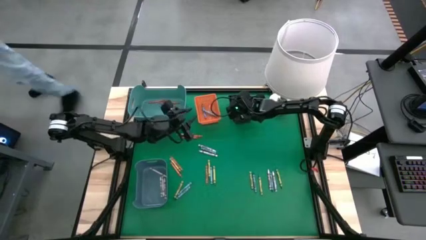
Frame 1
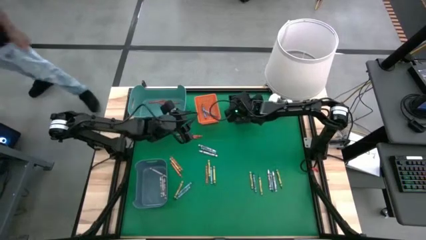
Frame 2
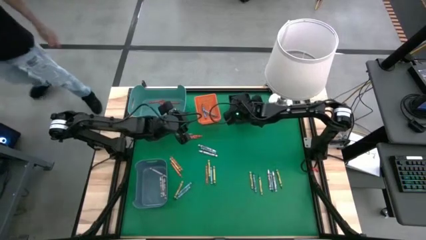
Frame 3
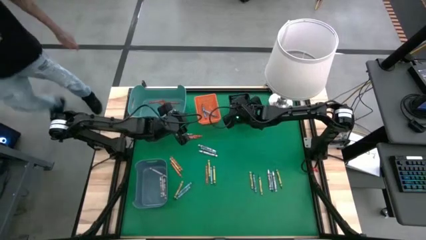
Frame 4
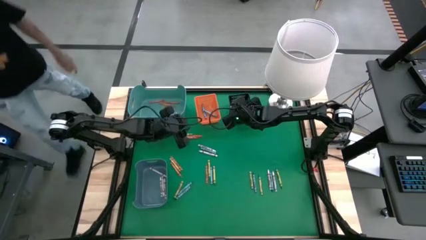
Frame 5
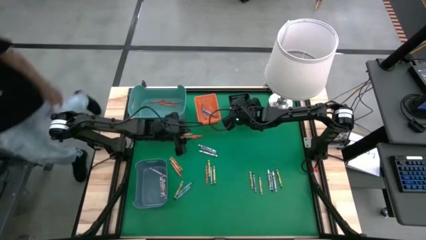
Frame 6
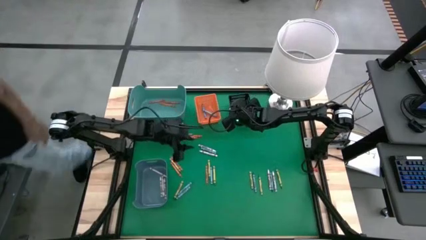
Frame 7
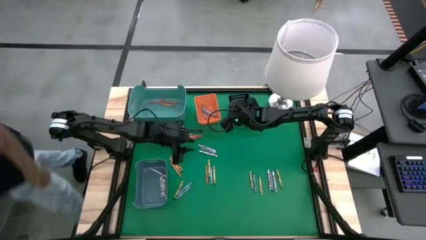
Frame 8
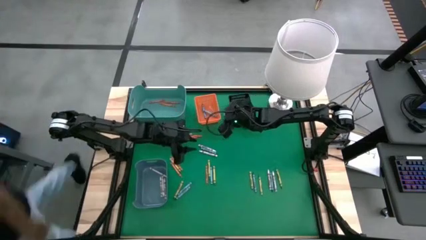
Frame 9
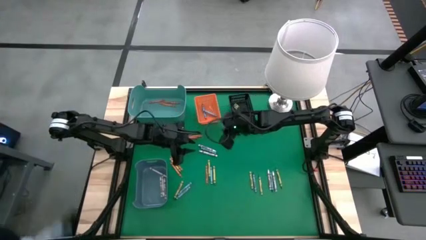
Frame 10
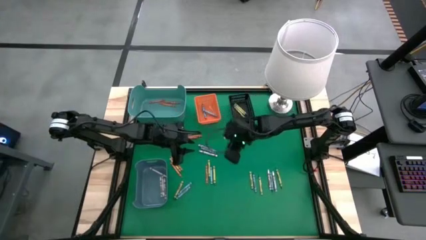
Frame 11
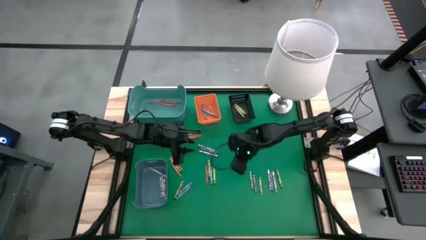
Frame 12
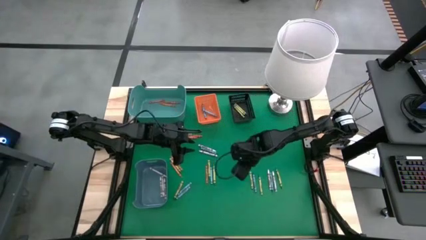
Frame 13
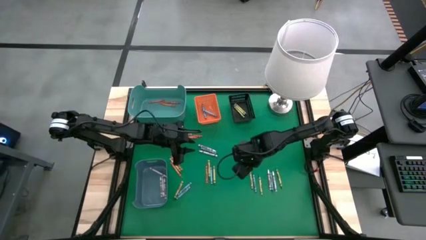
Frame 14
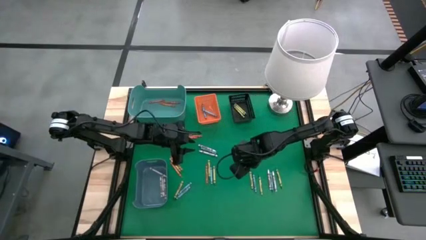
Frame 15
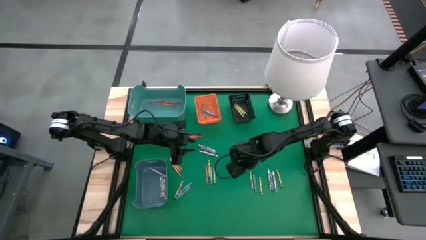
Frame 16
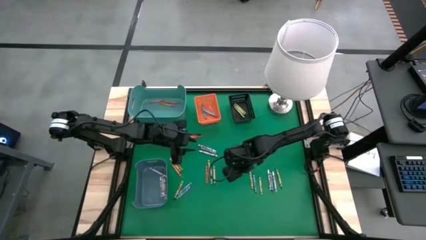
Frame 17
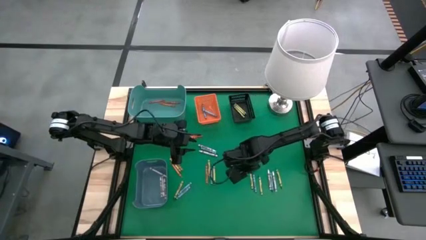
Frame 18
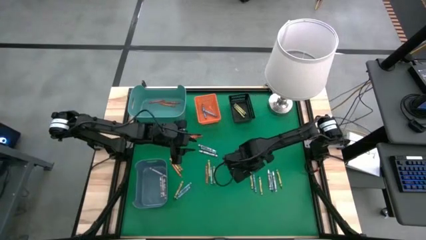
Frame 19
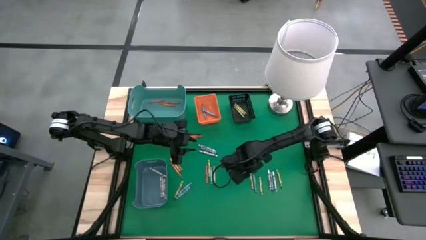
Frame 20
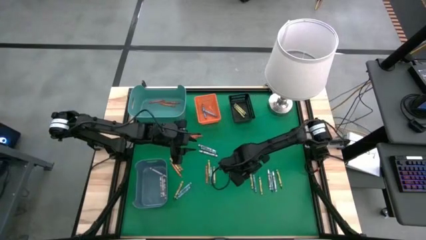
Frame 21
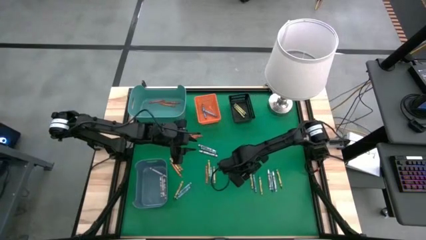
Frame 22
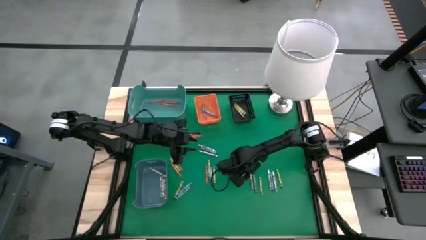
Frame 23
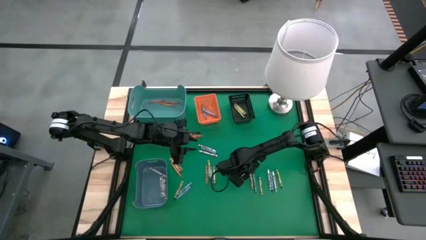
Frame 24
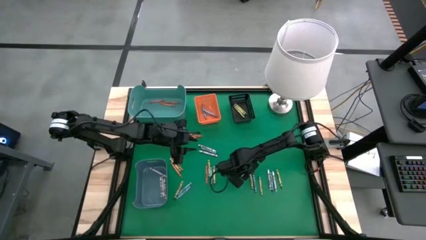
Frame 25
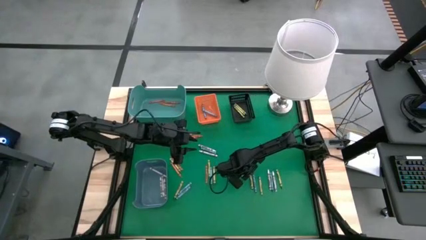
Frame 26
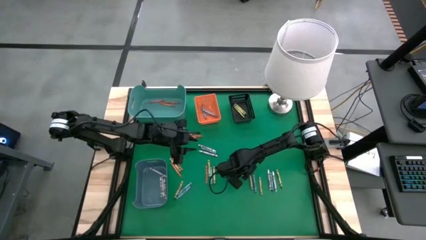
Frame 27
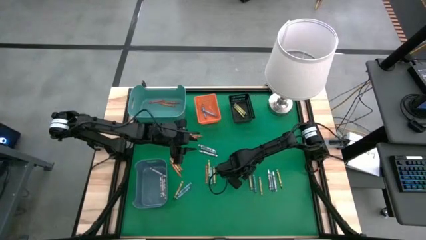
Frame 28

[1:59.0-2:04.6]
Task: Sort crayons
Put the green crayon into the black bin

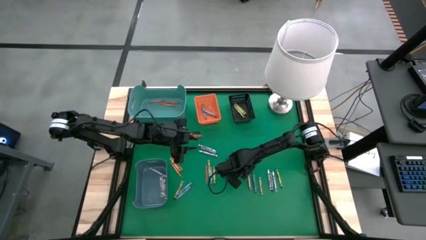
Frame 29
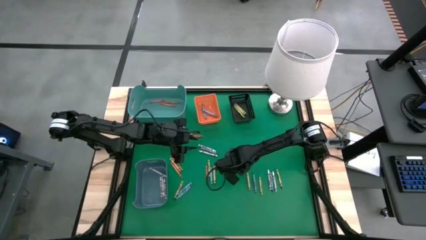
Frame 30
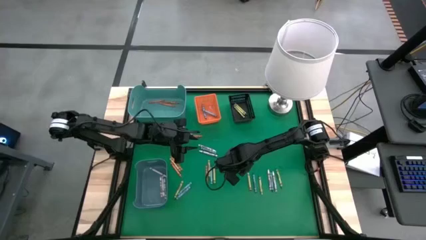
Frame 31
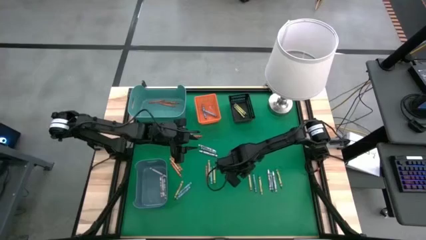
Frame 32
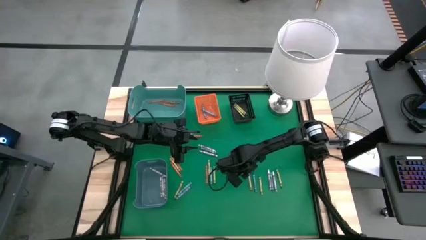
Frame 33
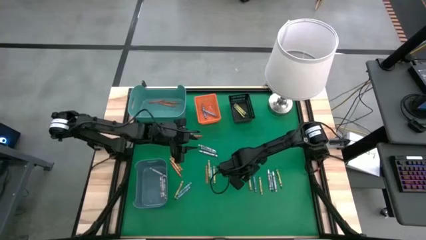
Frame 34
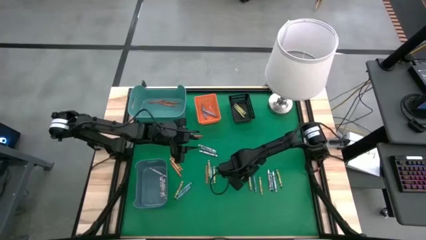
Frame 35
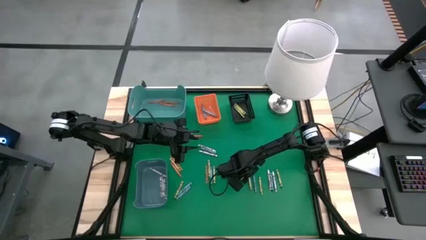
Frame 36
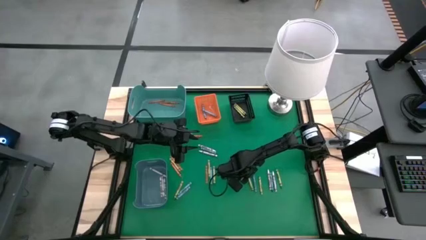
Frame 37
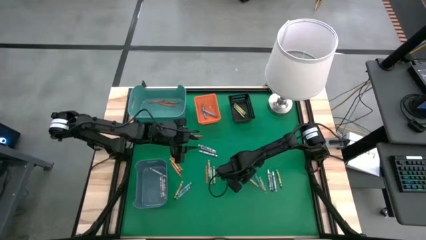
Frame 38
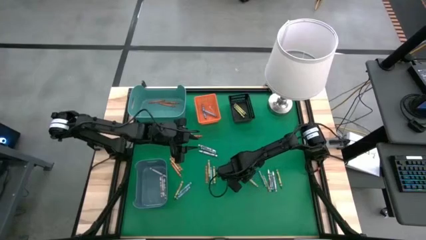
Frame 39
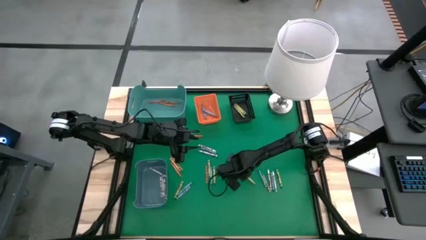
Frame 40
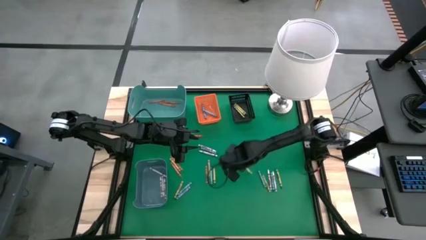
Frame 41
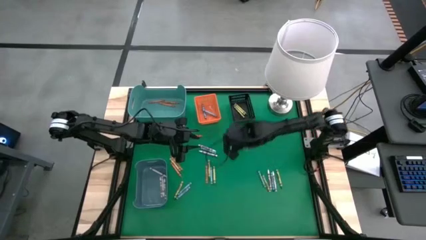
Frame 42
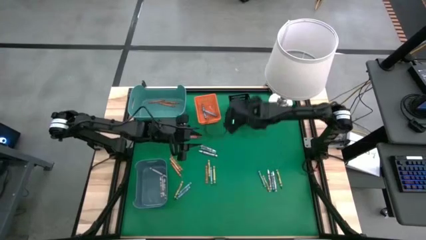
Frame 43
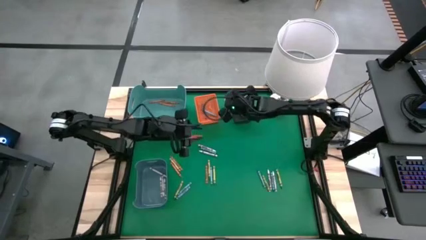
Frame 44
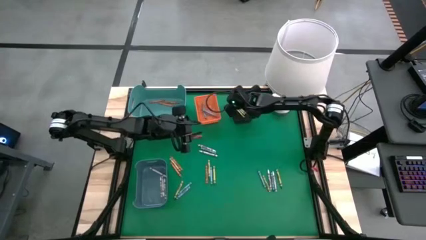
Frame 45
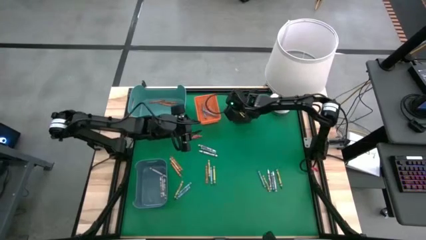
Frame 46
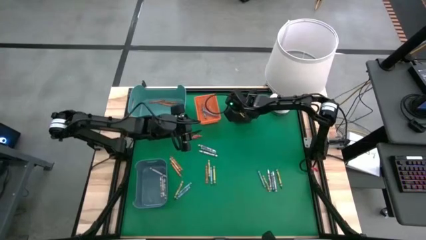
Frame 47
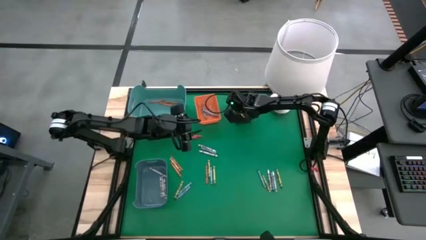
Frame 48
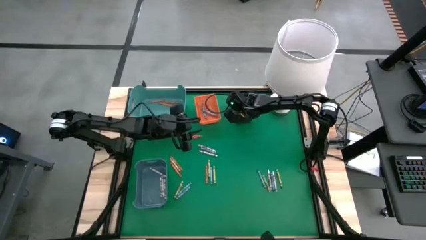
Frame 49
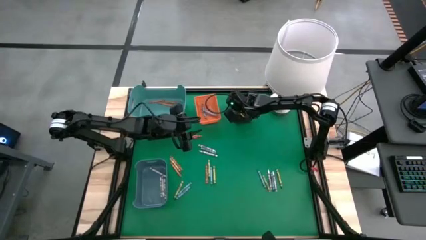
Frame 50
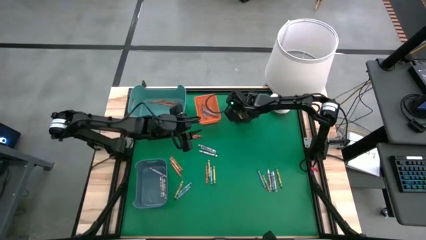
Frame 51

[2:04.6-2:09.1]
Put the green crayon into the black bin

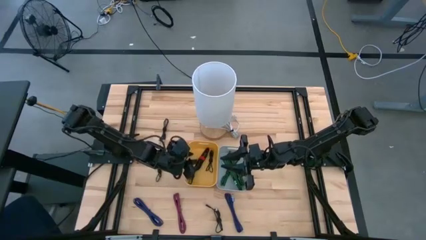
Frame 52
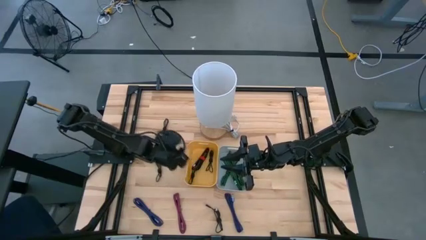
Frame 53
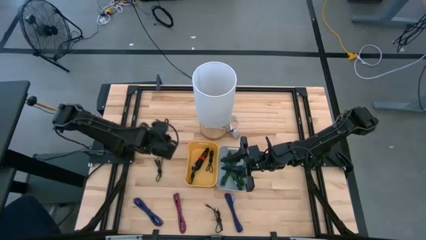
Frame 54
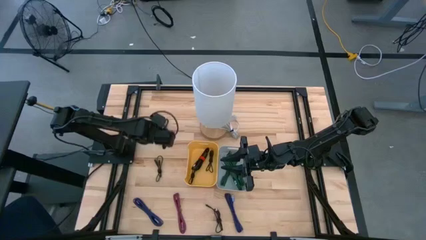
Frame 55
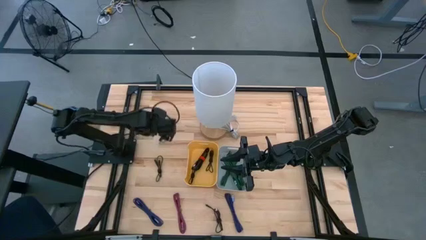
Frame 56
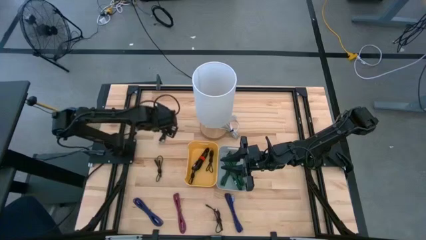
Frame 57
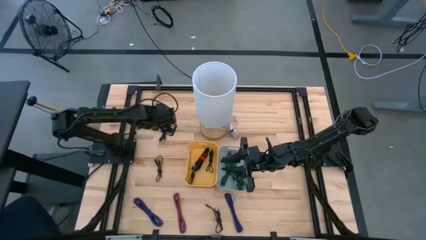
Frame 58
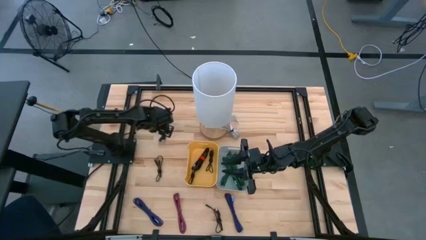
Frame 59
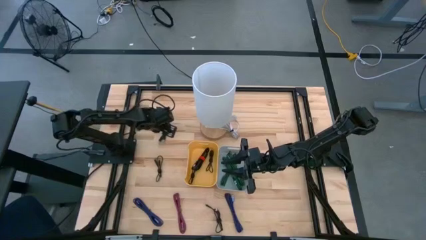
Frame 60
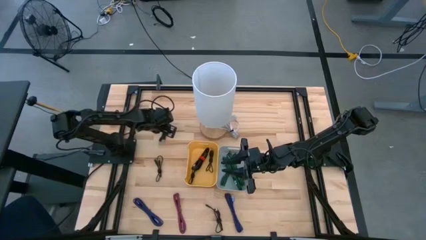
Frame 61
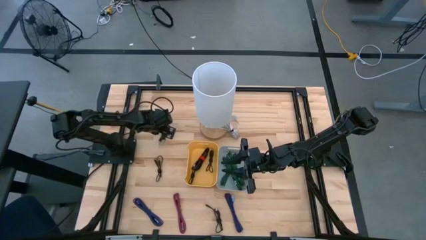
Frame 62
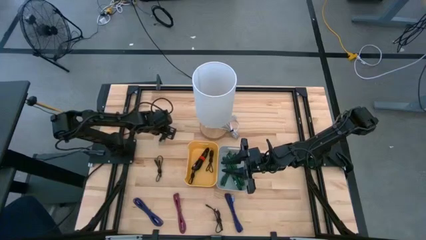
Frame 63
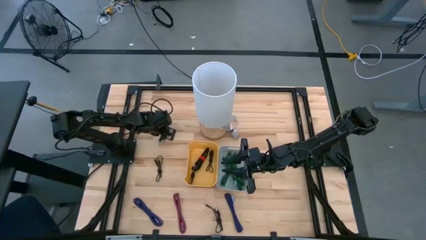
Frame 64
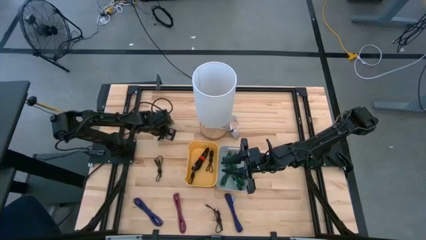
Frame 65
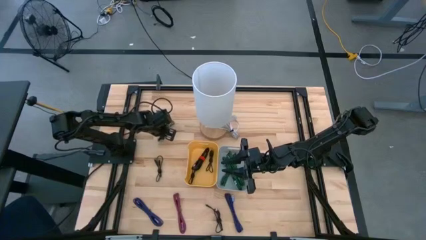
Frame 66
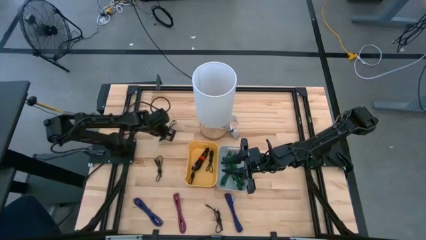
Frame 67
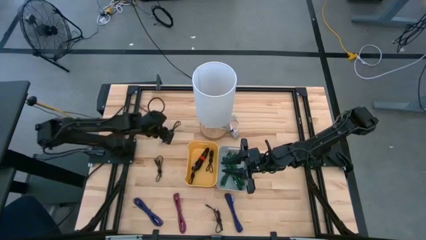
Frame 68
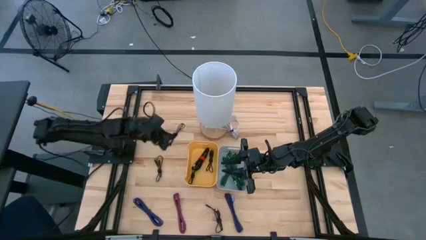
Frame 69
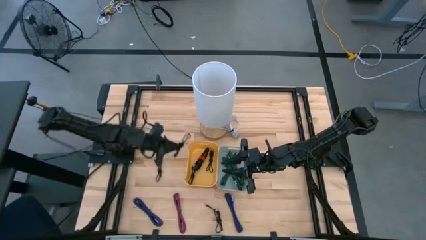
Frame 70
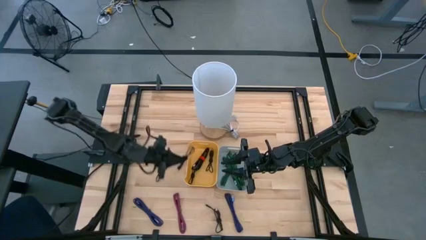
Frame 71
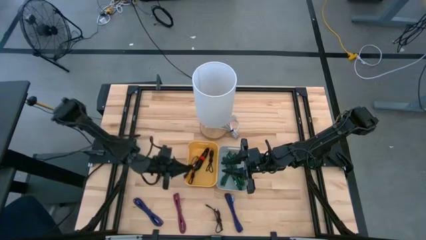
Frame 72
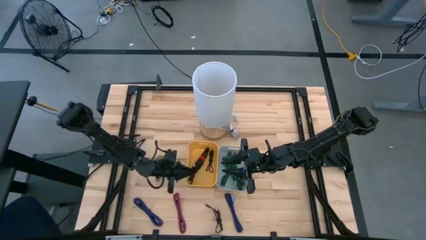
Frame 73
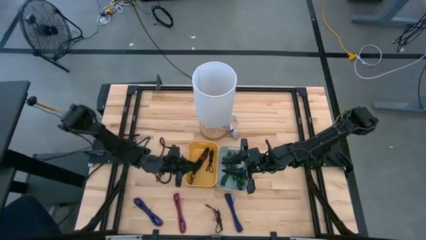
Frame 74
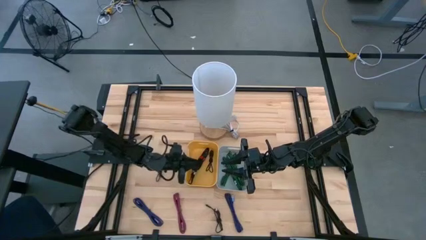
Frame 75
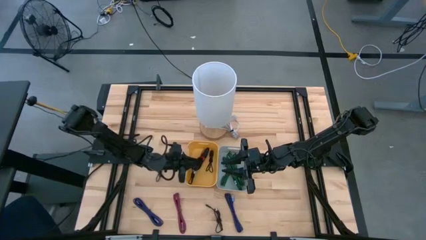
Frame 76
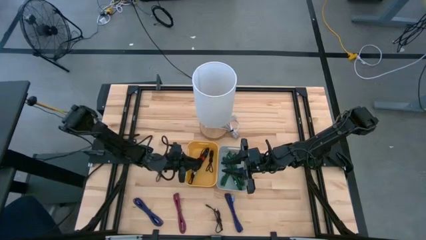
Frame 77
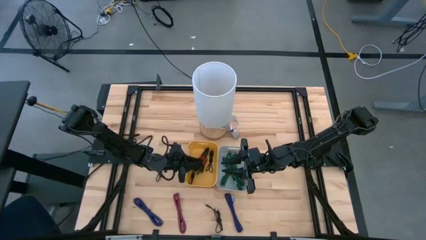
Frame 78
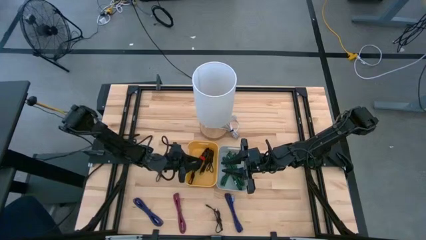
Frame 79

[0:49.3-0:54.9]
Task: Pick & Place USB Port
Put the black charger cable into the yellow bin
